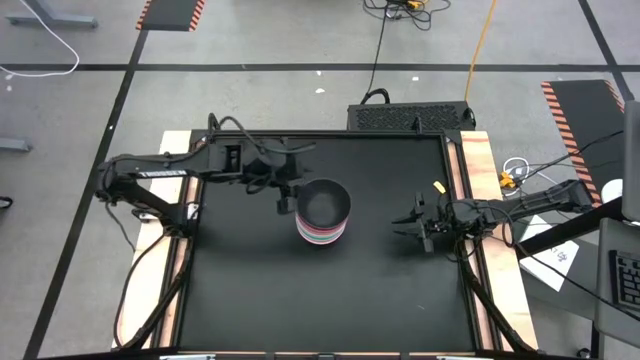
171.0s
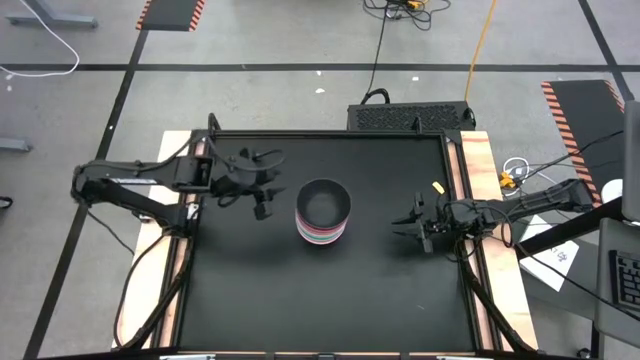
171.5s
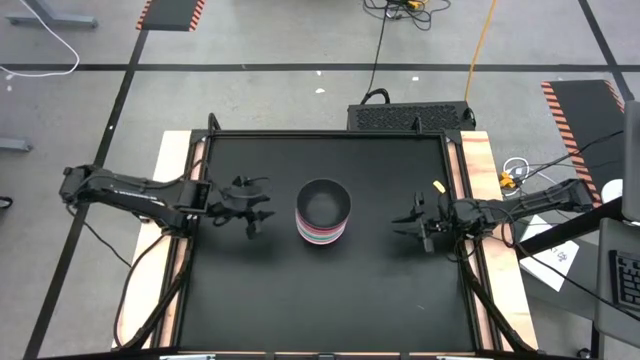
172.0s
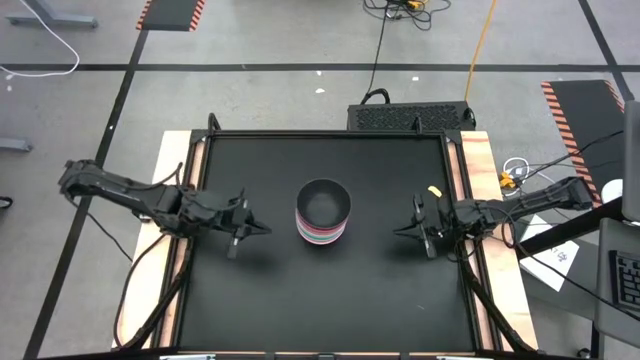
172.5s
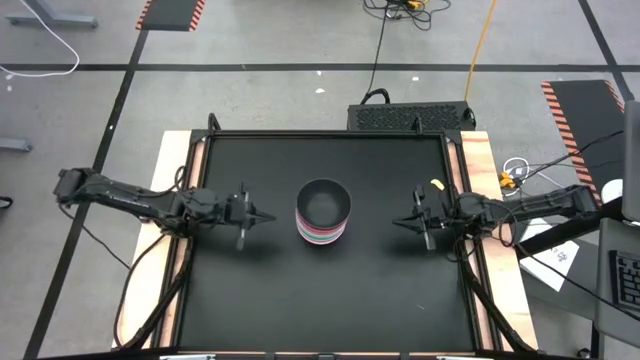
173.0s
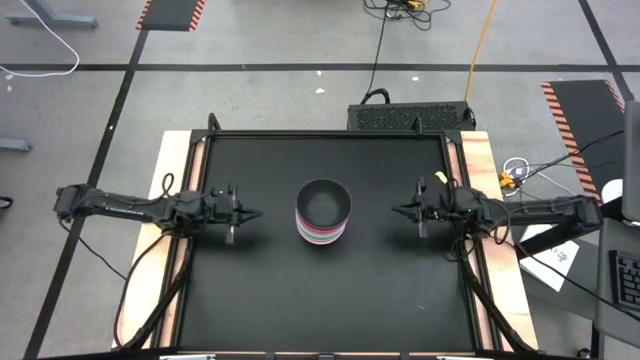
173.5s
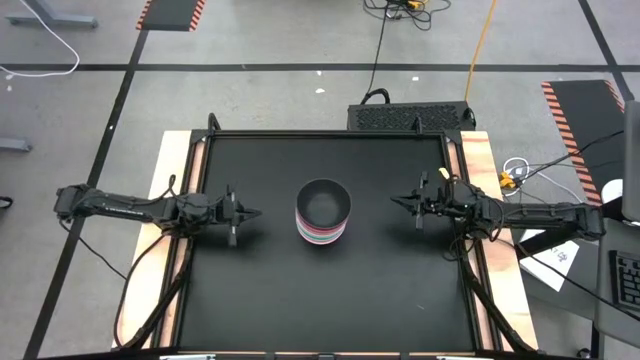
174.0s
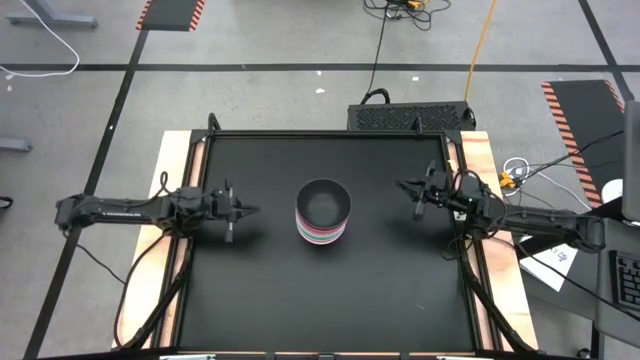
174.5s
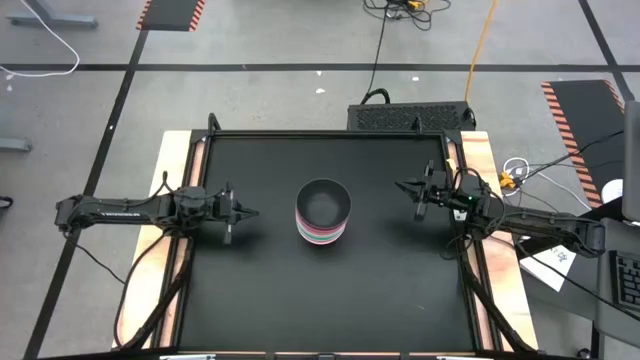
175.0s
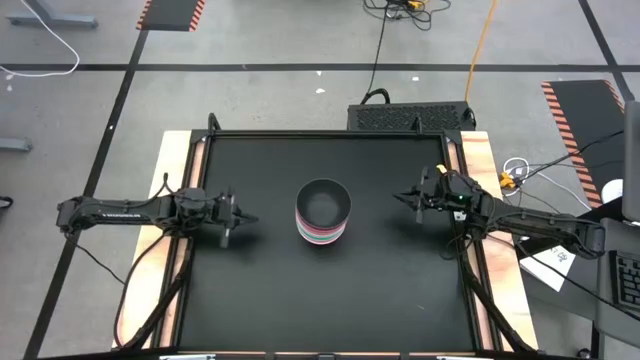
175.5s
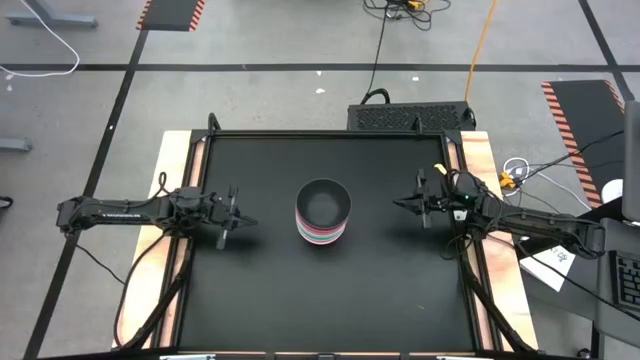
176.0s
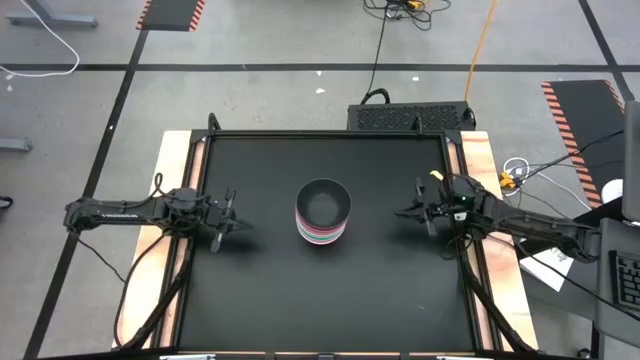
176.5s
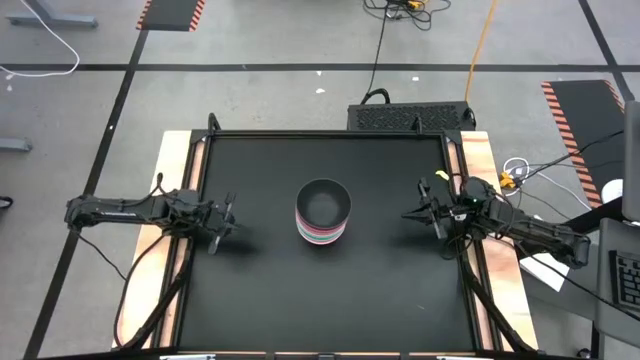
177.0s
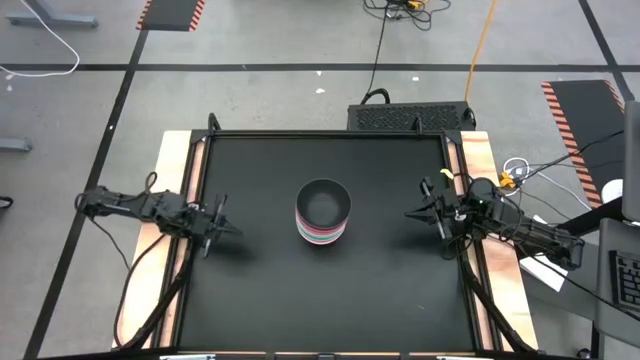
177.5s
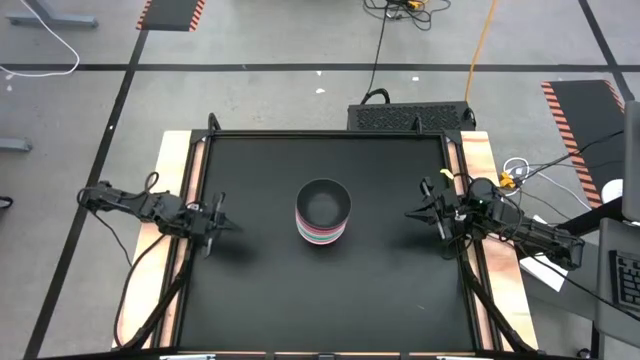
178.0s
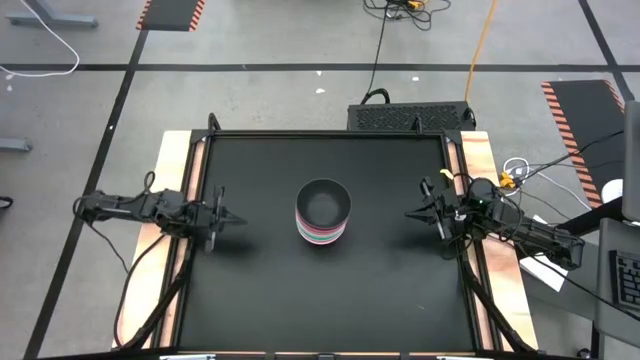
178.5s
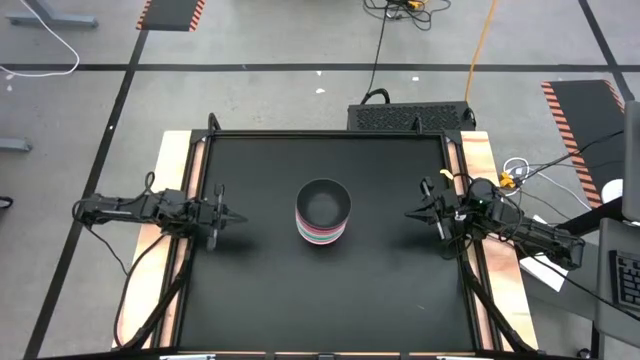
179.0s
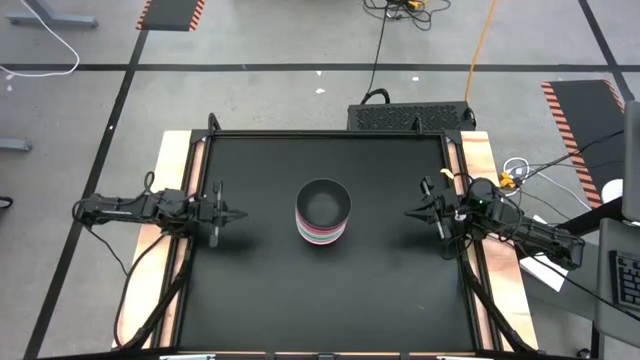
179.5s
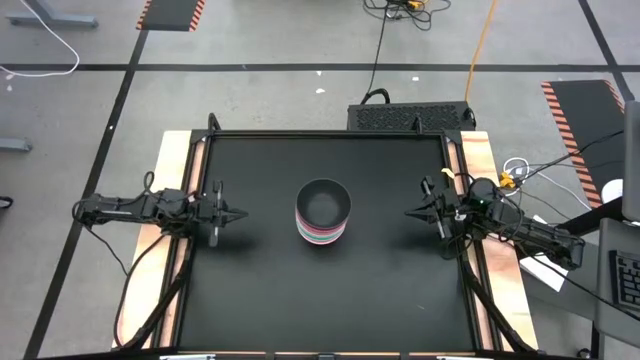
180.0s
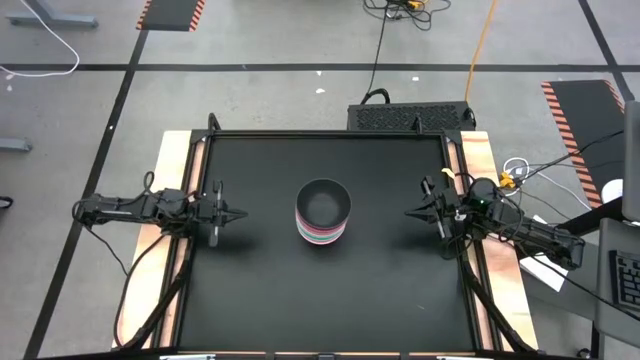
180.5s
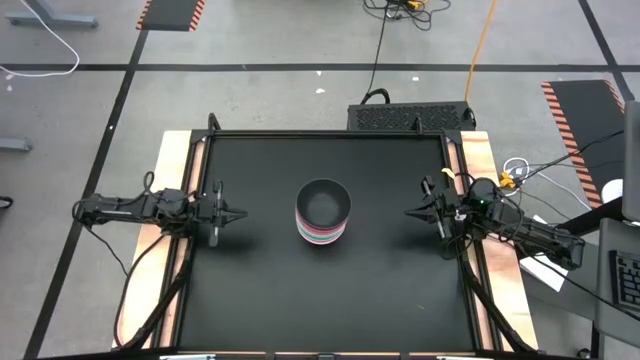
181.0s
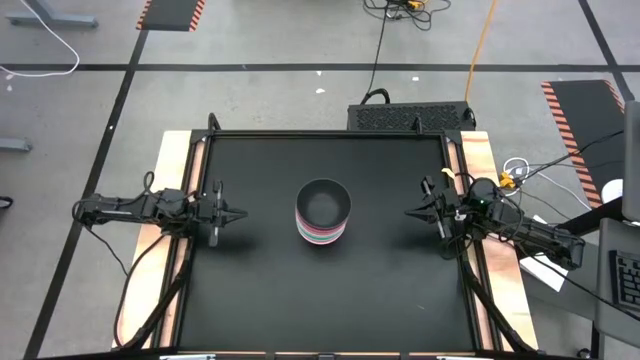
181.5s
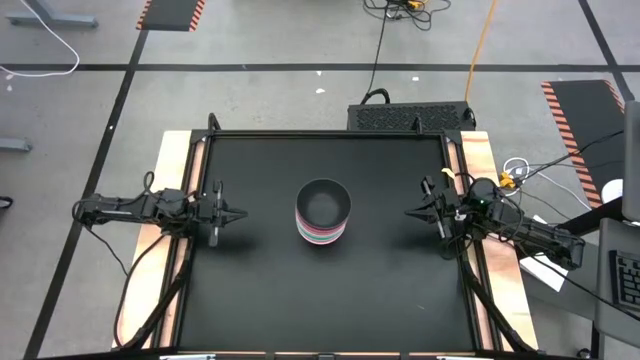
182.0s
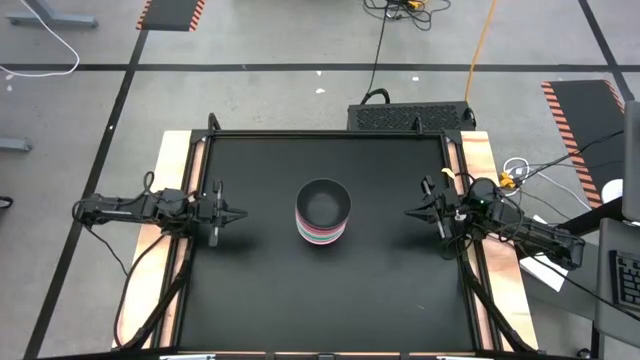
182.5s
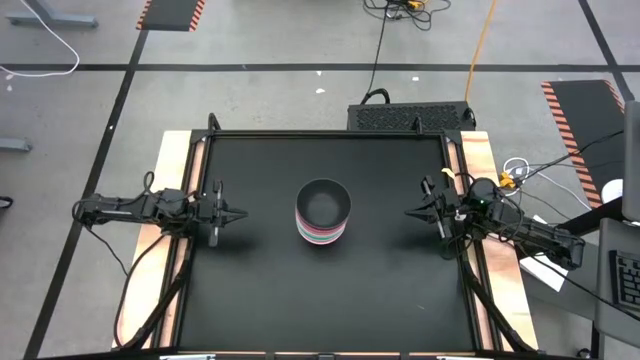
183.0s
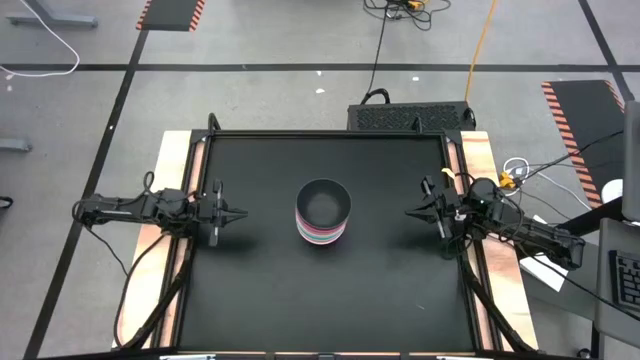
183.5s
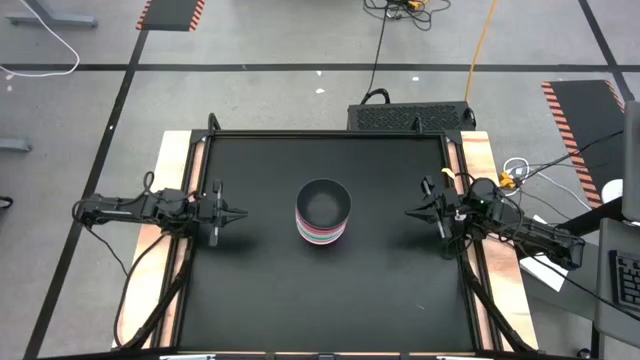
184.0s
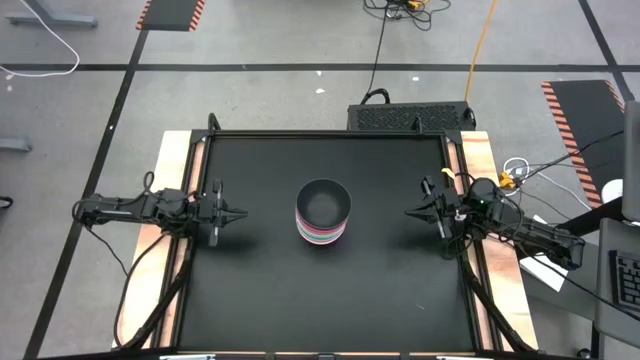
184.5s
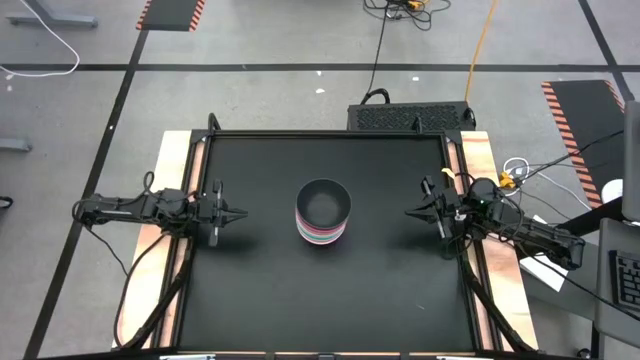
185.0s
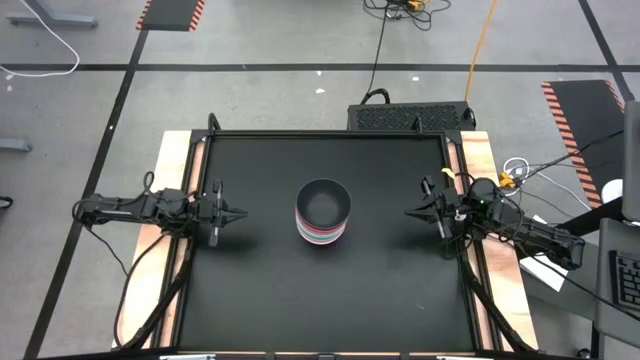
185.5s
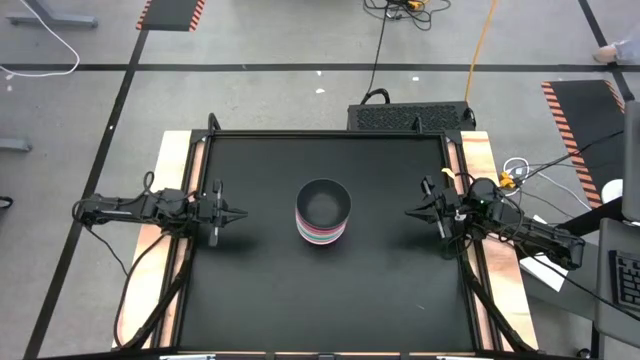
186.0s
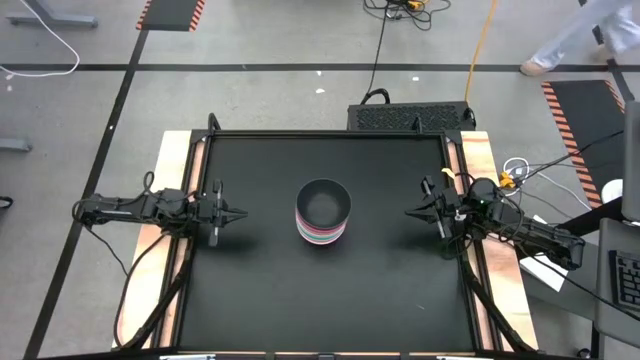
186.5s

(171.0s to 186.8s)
Task: Nest bowls inside each other
Return to Home Position

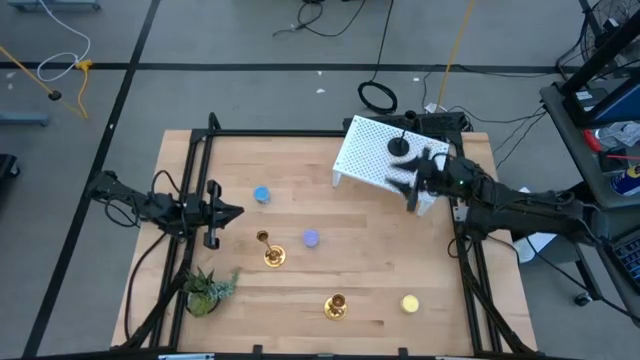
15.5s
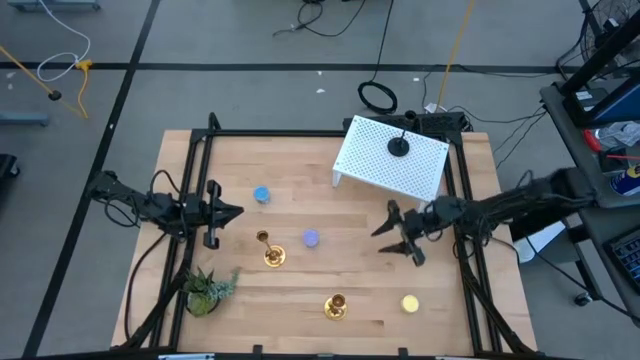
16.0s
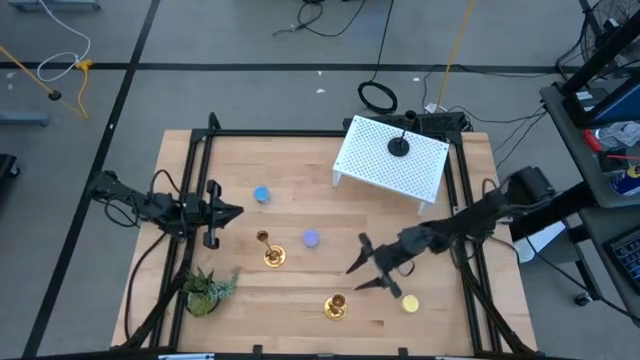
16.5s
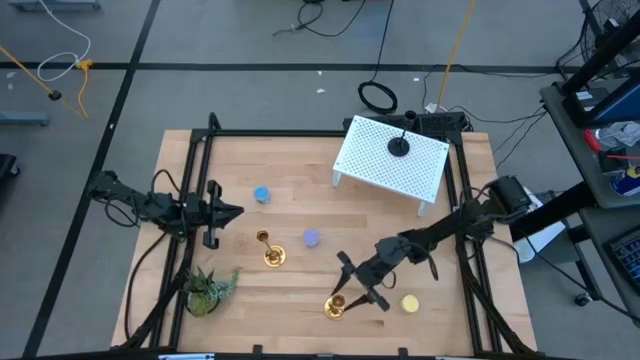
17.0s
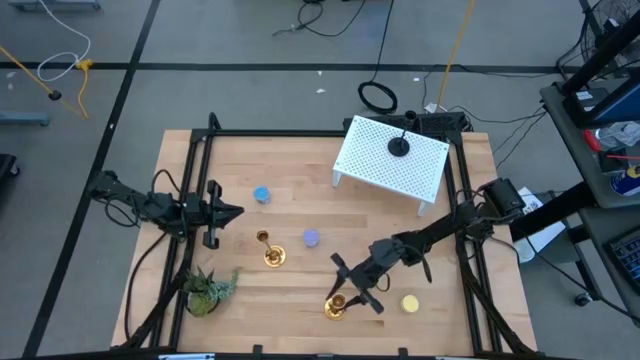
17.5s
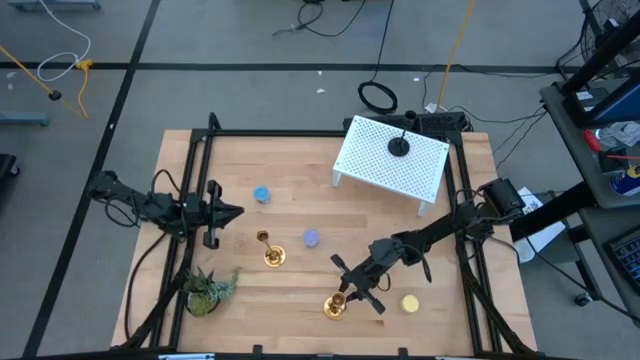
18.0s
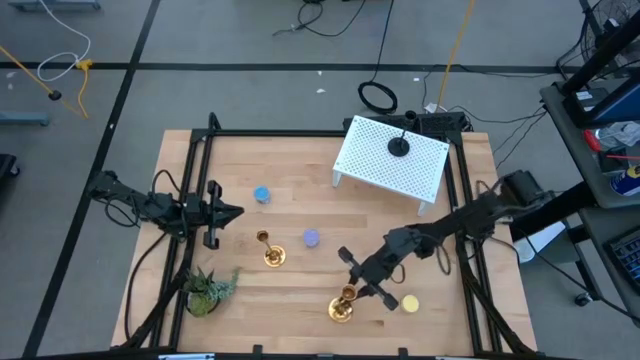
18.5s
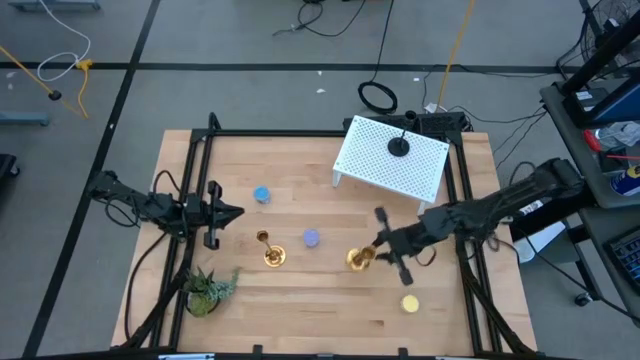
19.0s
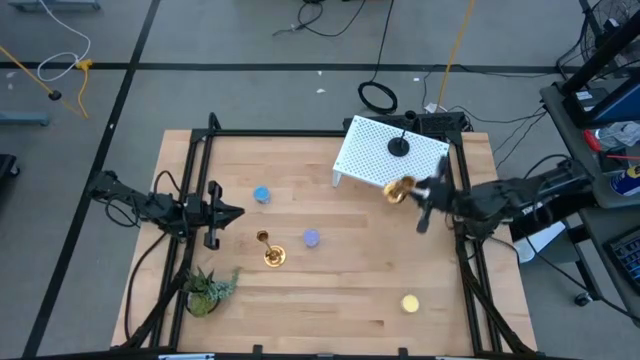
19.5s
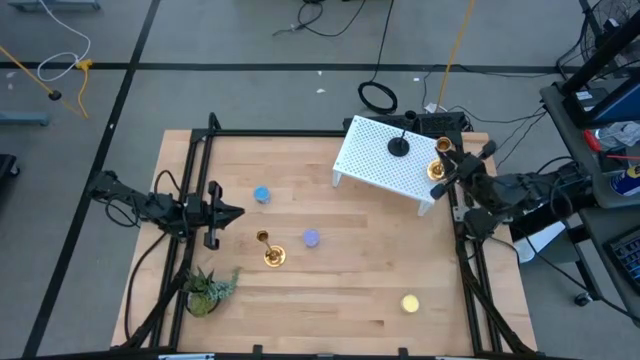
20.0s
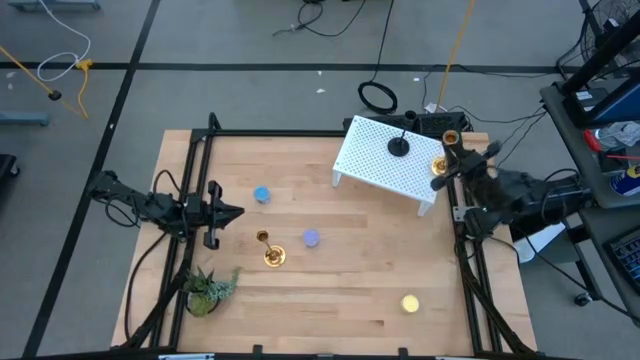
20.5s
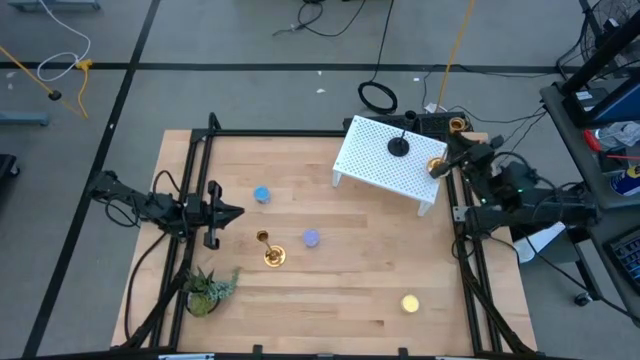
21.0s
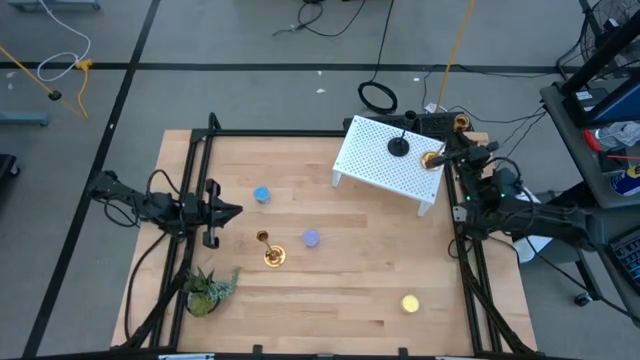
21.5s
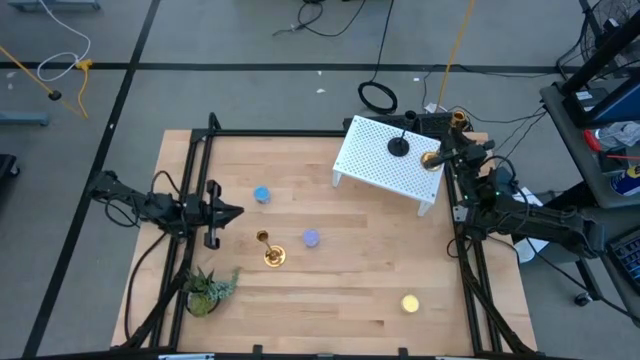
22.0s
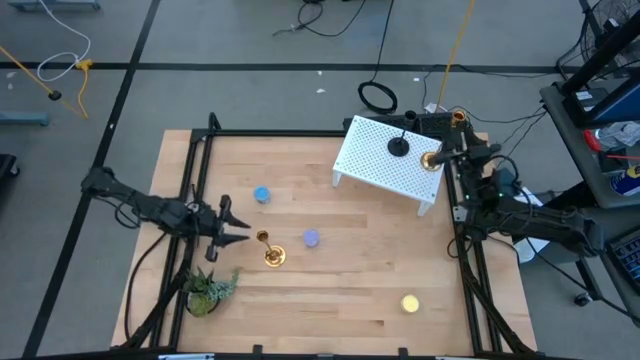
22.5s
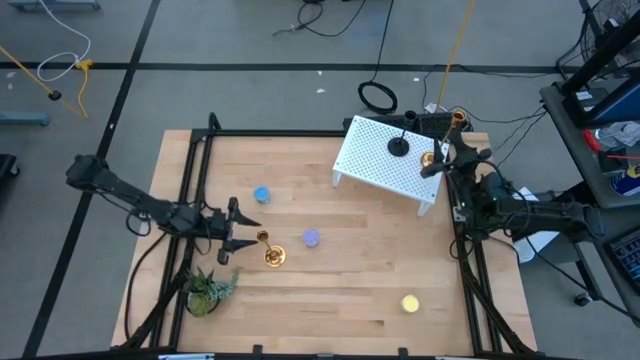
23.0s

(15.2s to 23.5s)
Task: Pick & Place candle stick holders
Put the right gold candle holder on the shelf aligned with the black candle holder
